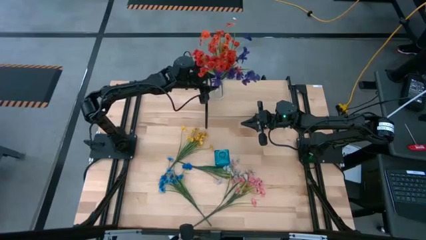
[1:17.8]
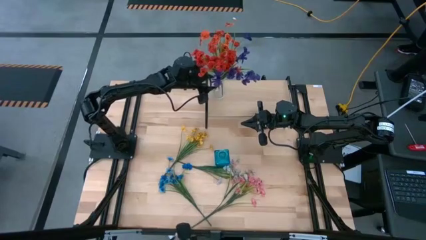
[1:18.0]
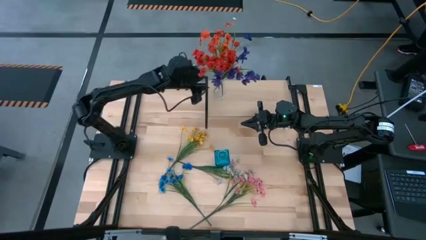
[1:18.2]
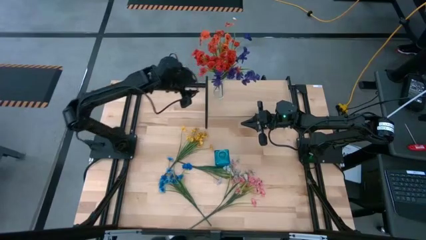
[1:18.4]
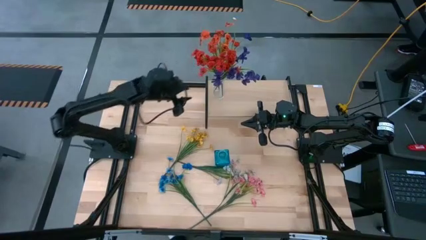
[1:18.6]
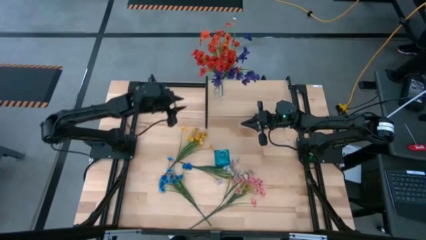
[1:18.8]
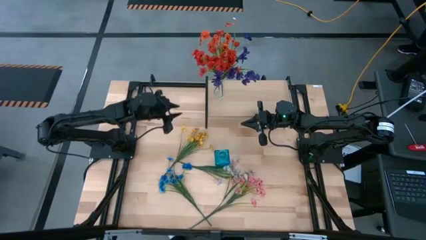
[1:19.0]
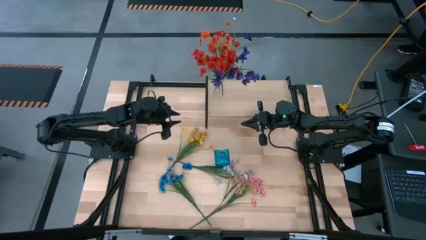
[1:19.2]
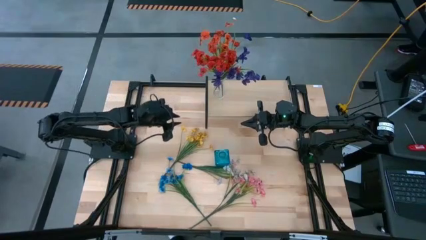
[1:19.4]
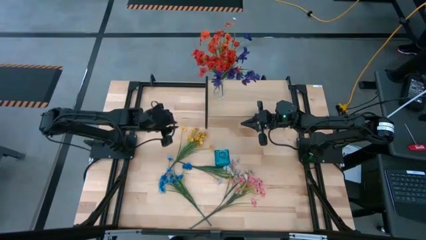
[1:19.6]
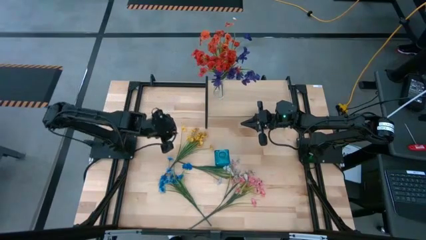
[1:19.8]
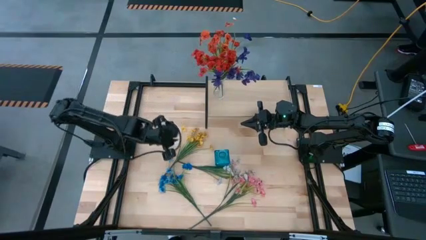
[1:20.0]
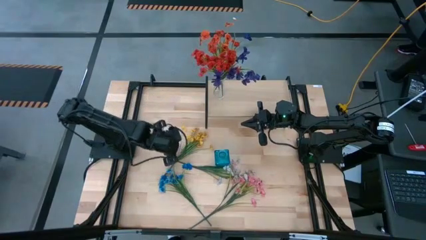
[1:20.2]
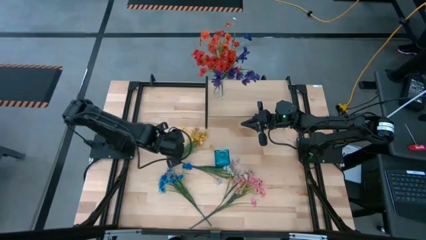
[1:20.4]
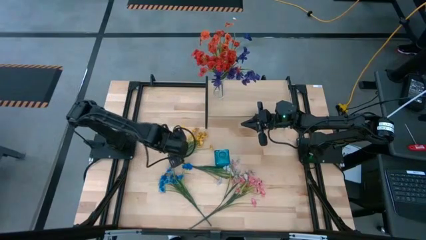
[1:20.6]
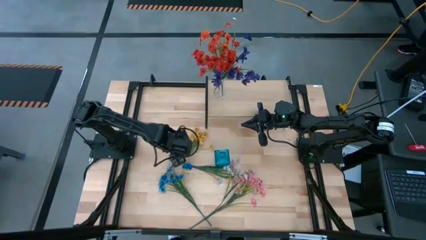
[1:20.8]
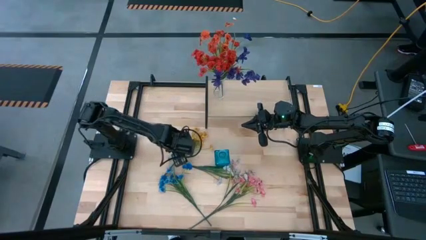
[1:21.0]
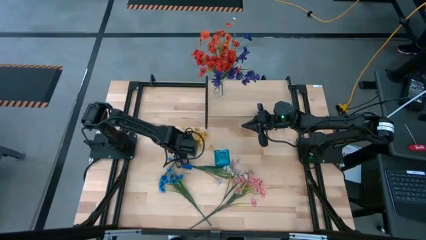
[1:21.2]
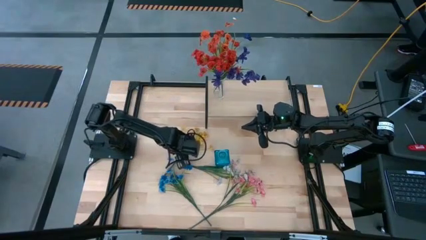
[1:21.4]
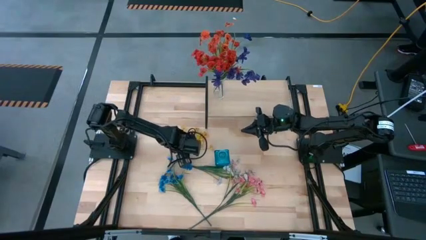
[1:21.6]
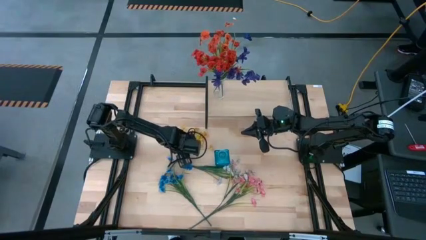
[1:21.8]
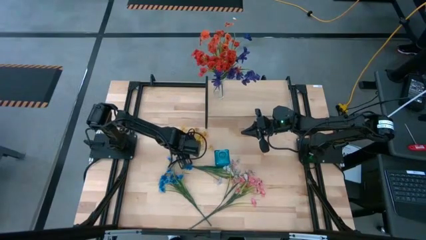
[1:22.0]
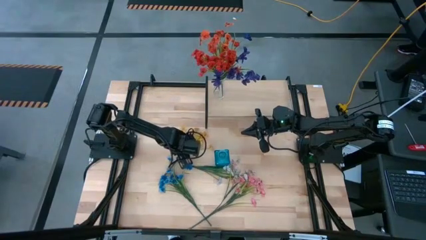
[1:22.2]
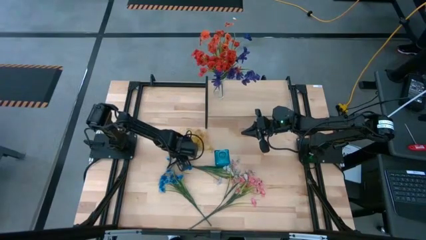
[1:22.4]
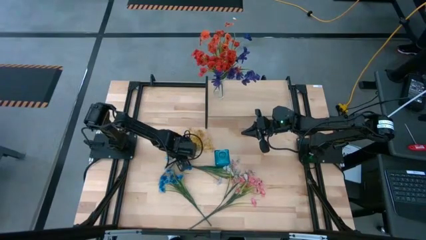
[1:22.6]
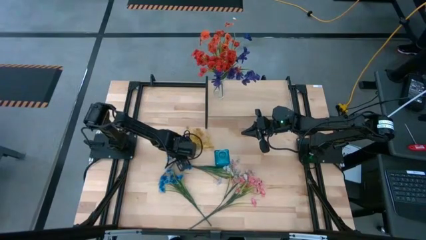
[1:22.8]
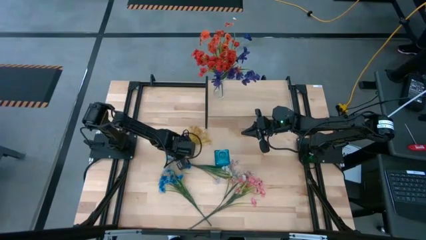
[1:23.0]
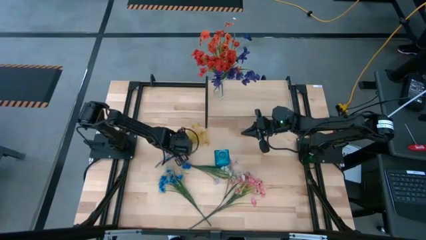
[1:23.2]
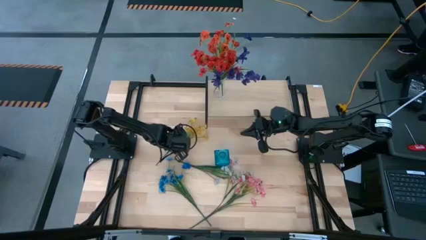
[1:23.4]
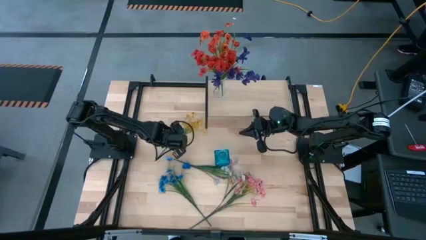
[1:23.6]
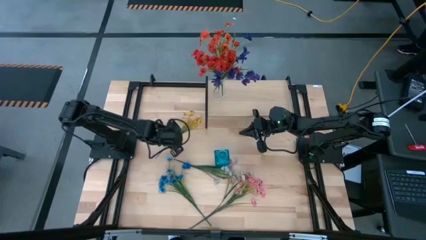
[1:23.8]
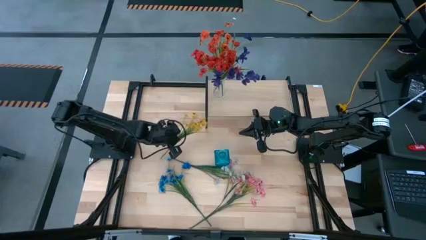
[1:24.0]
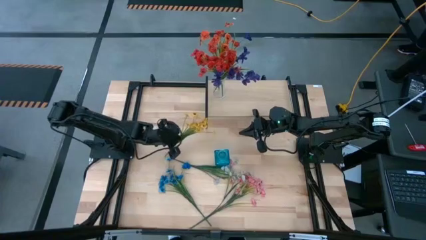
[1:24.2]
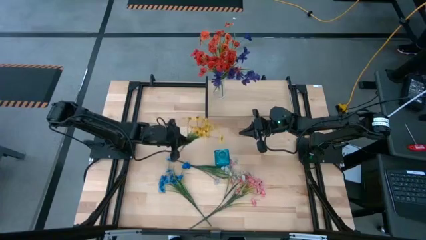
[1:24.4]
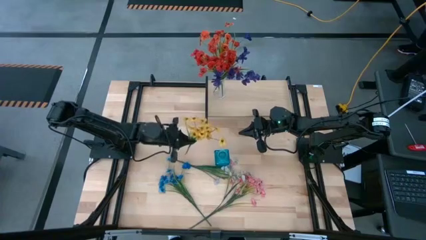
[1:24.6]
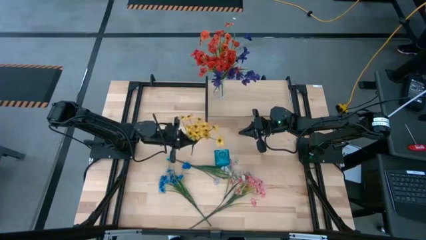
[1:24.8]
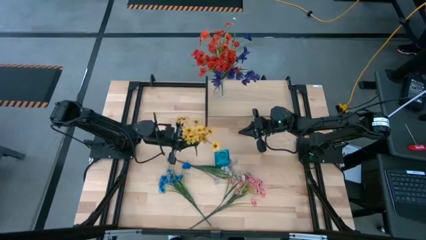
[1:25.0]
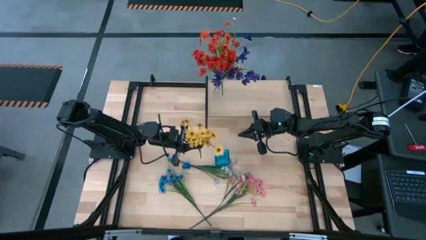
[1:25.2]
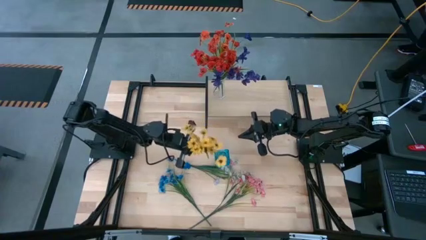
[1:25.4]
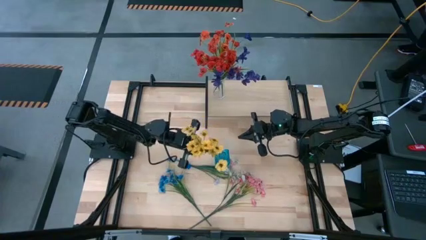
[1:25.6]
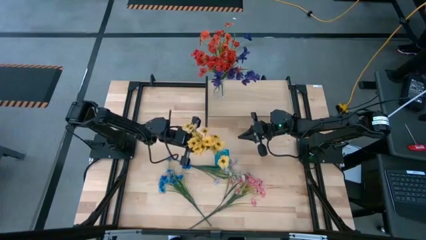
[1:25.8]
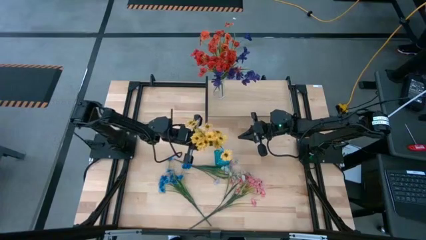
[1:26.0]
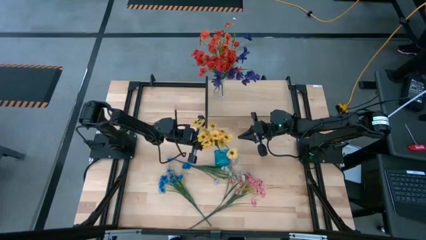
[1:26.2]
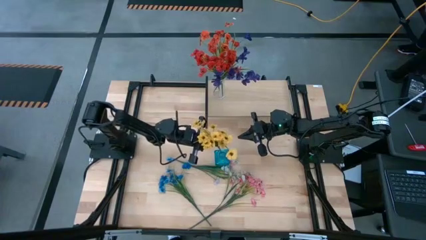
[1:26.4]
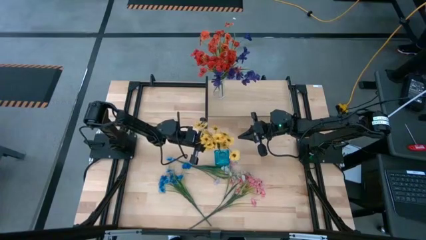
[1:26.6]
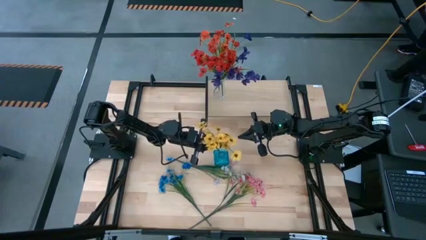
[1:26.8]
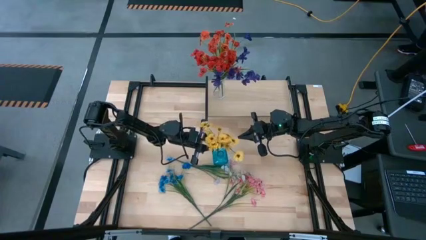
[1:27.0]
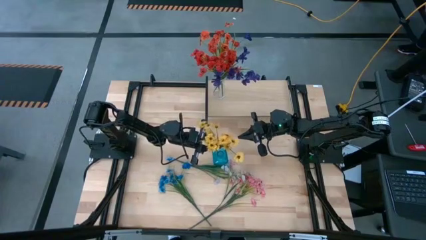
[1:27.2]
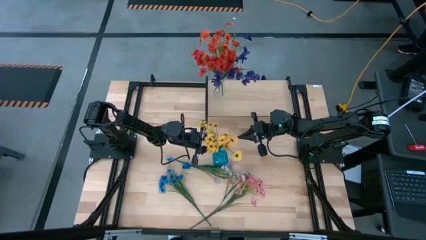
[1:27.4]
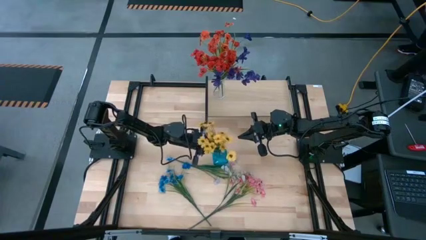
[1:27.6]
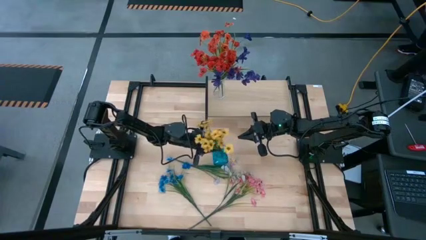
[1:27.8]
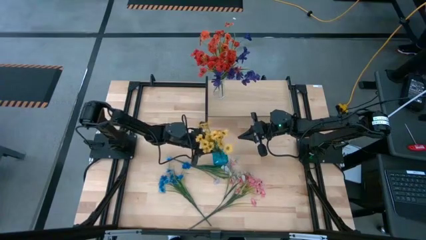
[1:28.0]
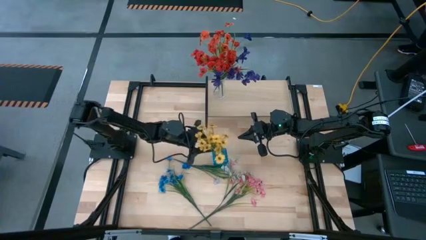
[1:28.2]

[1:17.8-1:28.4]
Task: Pick and place flowers into a vace then onto a shelf
Put the yellow flowers into the blue vase
